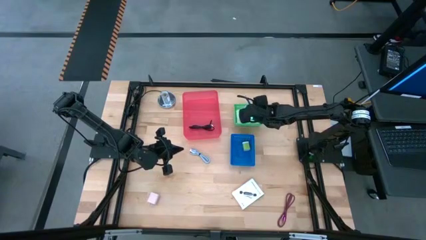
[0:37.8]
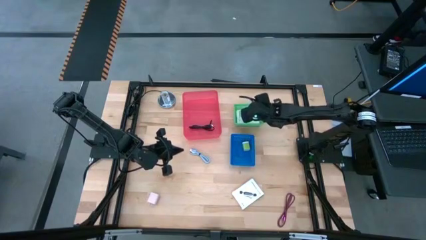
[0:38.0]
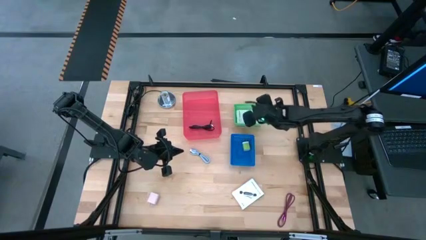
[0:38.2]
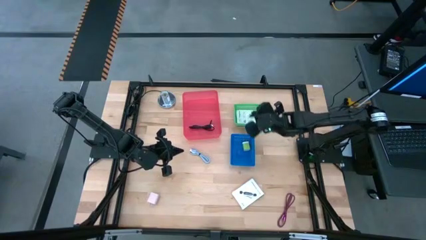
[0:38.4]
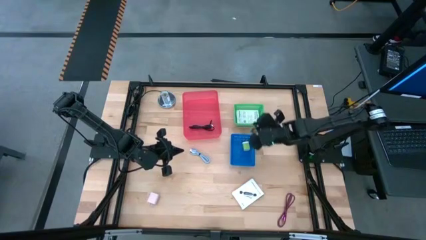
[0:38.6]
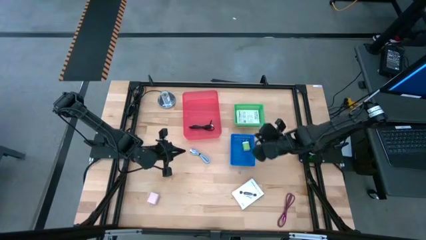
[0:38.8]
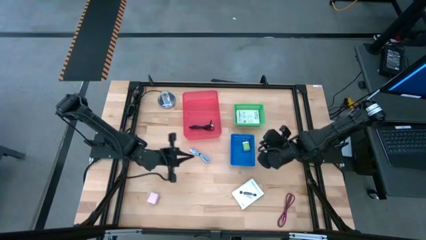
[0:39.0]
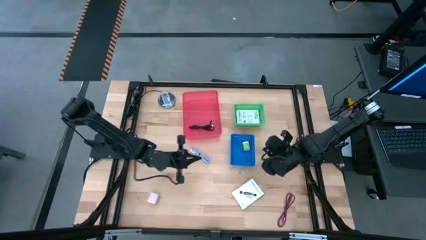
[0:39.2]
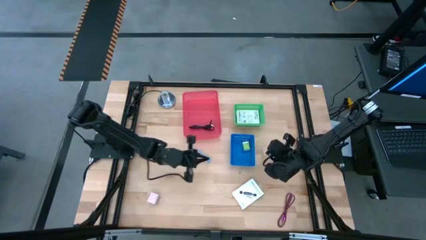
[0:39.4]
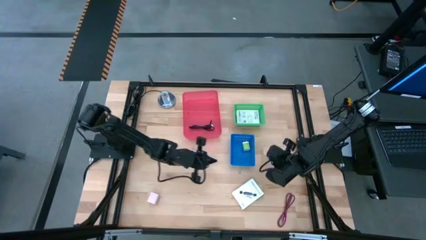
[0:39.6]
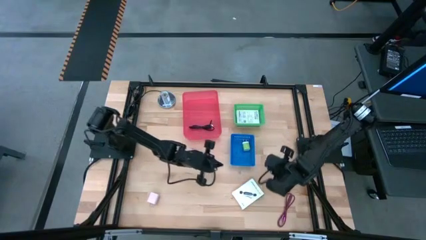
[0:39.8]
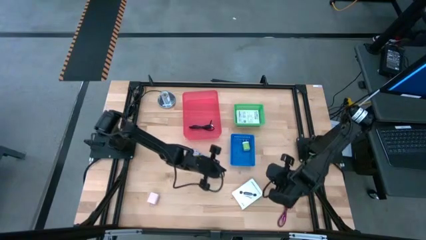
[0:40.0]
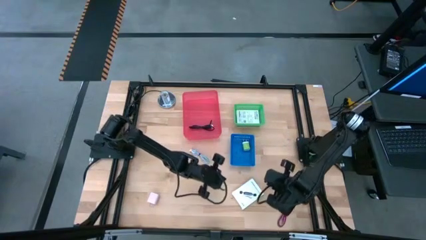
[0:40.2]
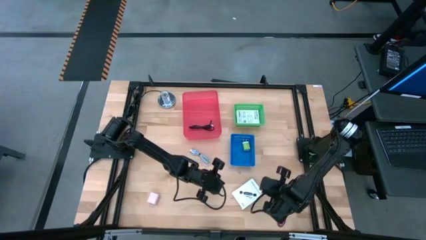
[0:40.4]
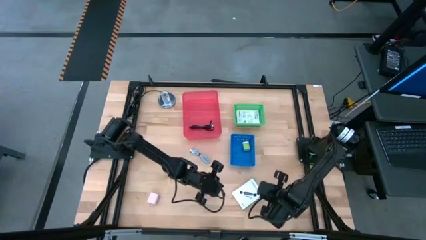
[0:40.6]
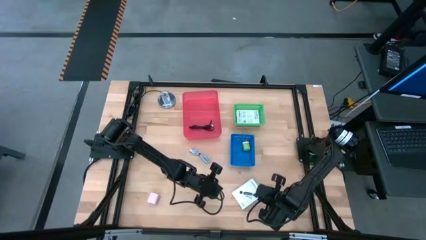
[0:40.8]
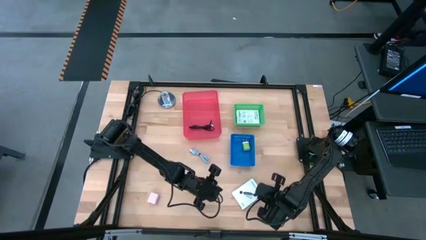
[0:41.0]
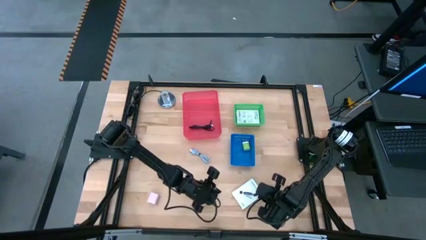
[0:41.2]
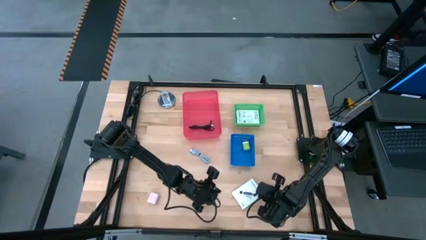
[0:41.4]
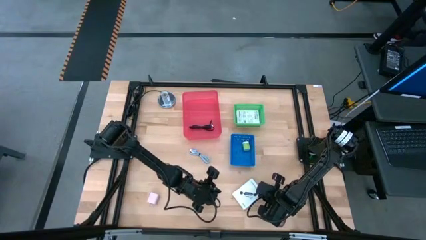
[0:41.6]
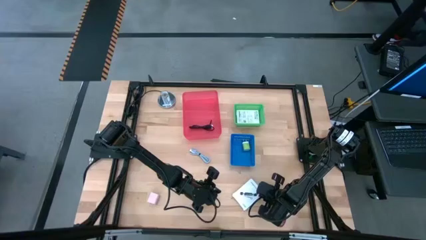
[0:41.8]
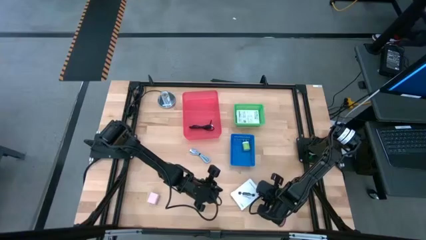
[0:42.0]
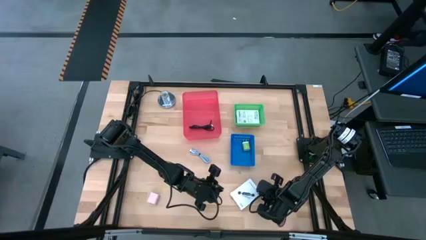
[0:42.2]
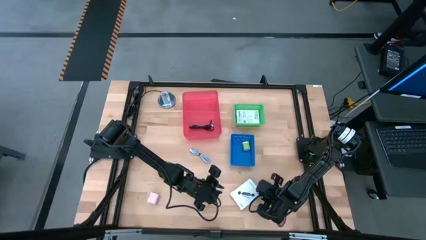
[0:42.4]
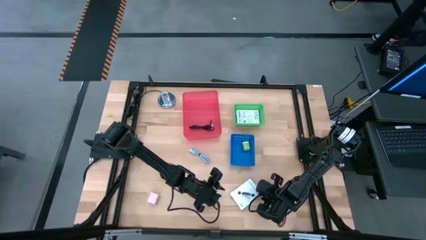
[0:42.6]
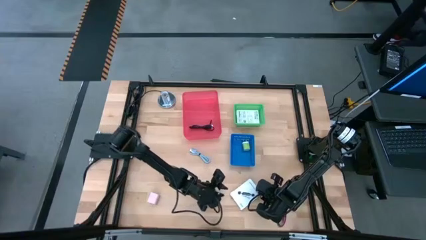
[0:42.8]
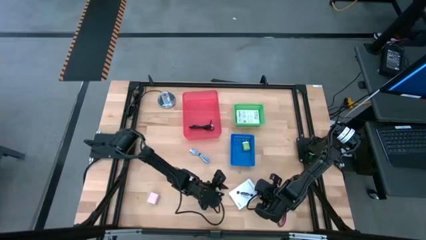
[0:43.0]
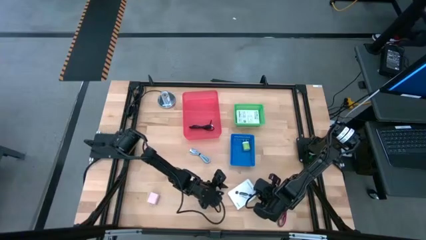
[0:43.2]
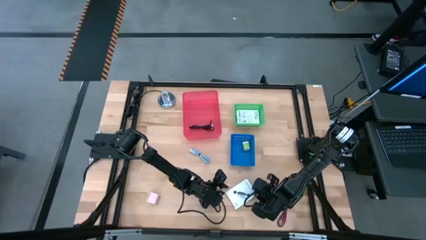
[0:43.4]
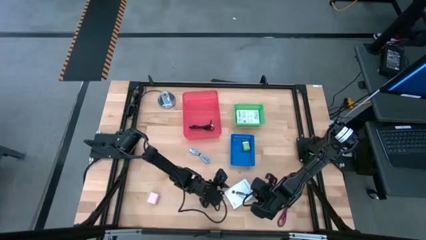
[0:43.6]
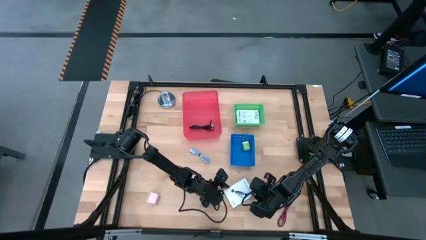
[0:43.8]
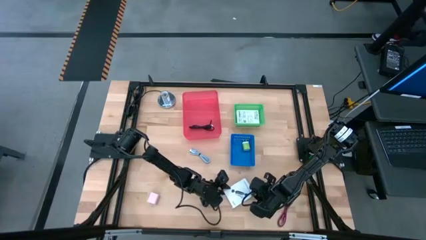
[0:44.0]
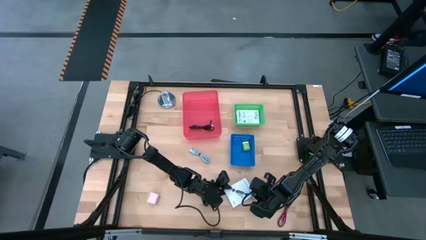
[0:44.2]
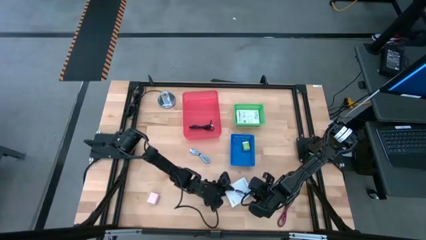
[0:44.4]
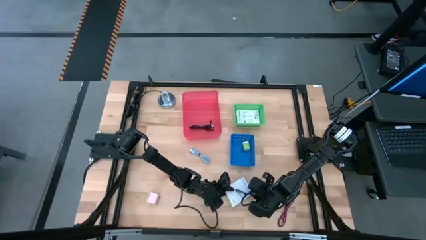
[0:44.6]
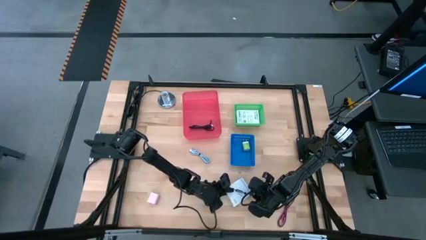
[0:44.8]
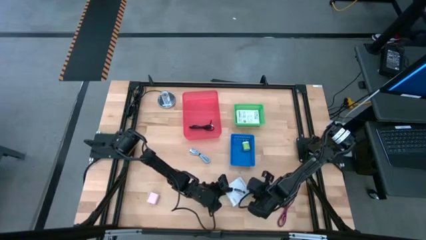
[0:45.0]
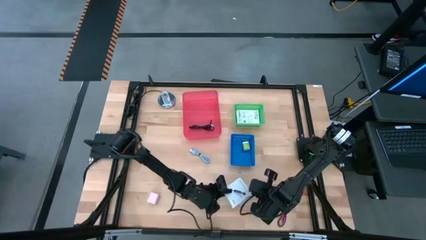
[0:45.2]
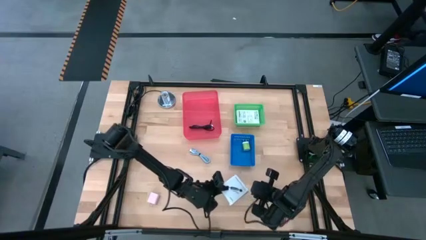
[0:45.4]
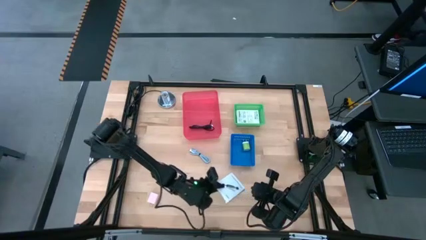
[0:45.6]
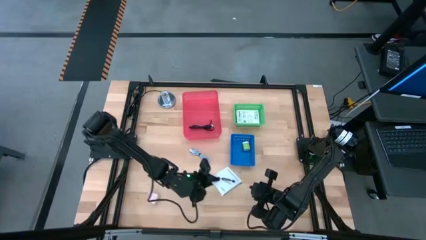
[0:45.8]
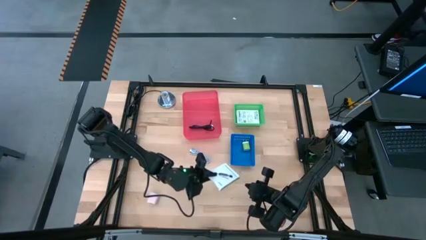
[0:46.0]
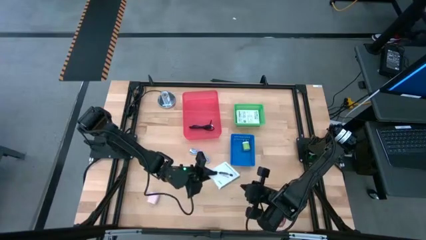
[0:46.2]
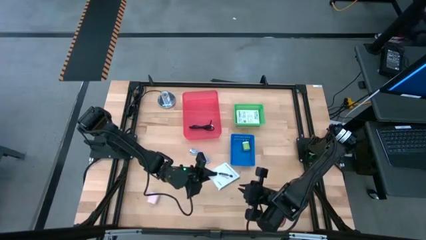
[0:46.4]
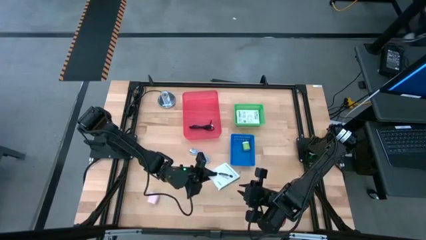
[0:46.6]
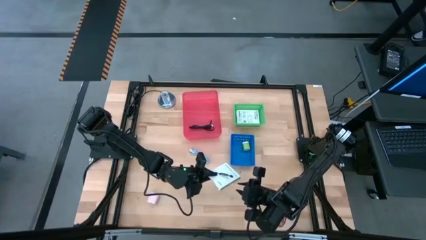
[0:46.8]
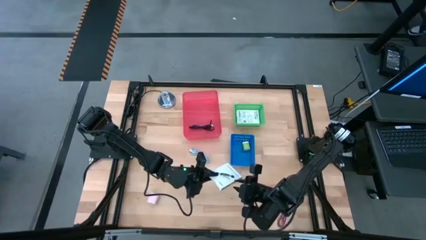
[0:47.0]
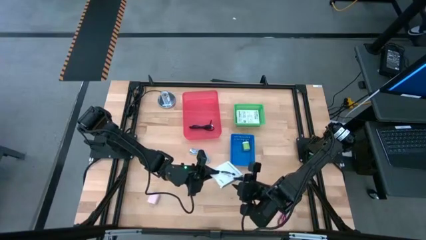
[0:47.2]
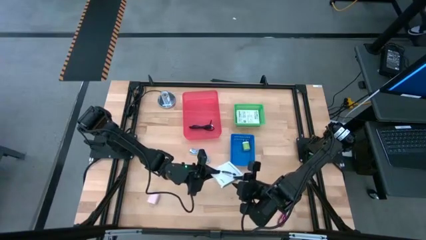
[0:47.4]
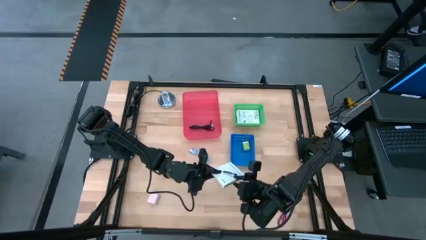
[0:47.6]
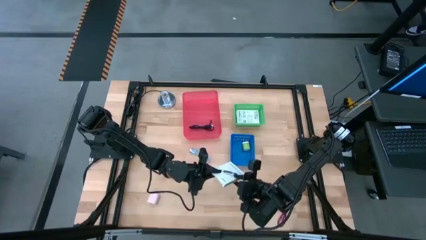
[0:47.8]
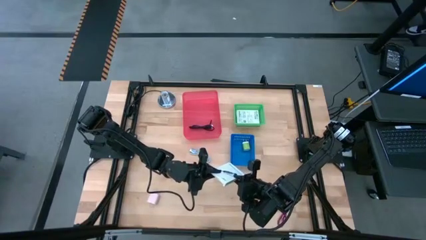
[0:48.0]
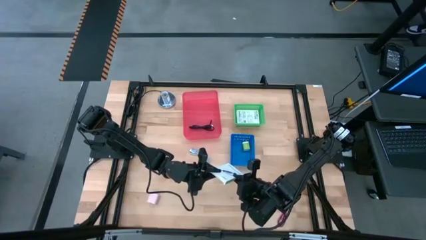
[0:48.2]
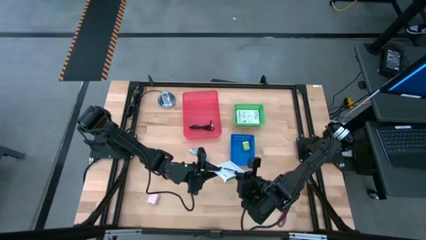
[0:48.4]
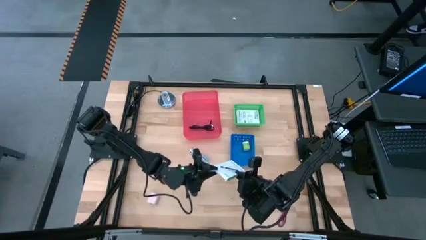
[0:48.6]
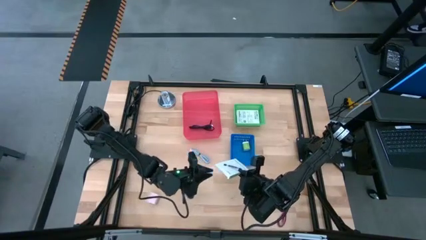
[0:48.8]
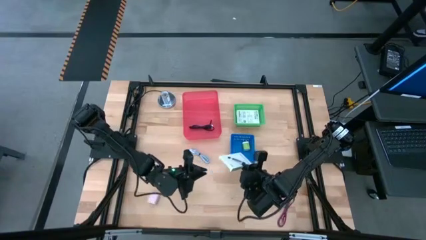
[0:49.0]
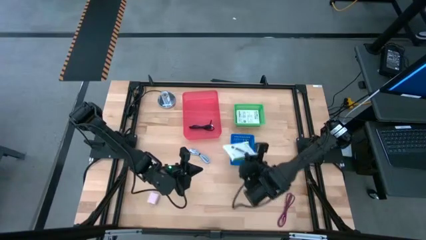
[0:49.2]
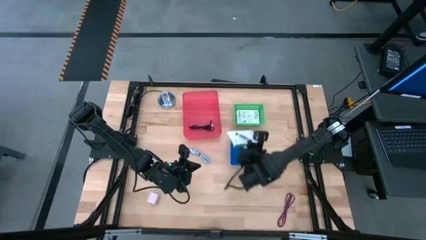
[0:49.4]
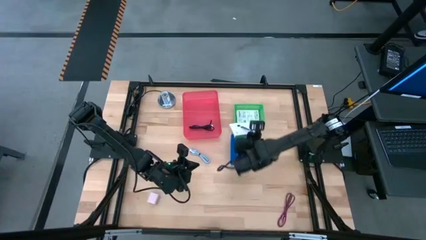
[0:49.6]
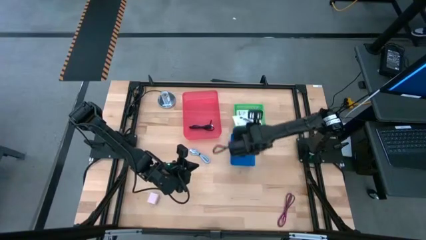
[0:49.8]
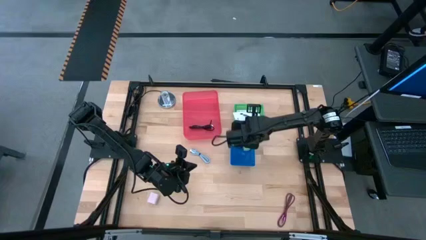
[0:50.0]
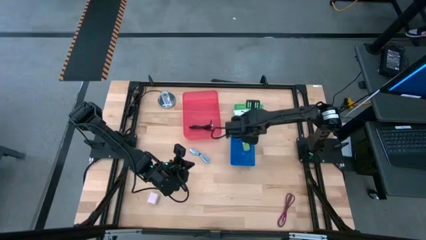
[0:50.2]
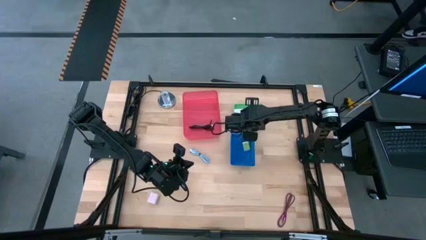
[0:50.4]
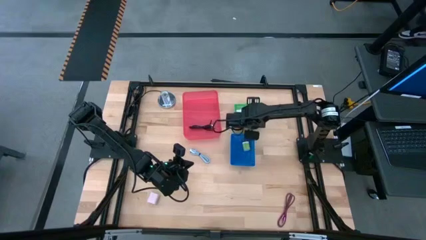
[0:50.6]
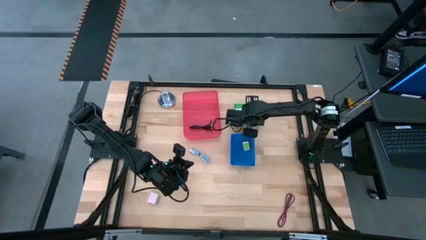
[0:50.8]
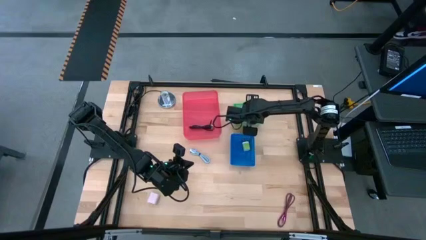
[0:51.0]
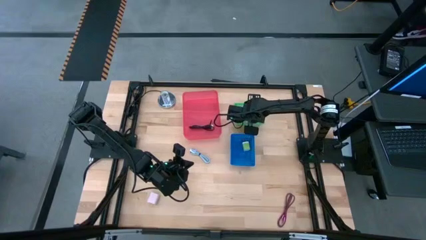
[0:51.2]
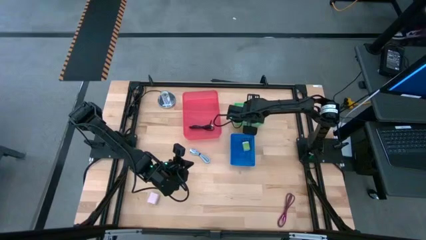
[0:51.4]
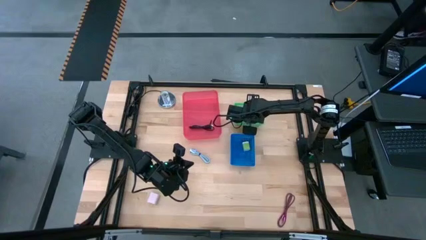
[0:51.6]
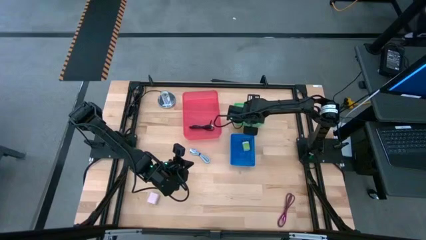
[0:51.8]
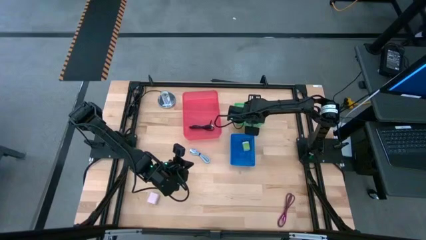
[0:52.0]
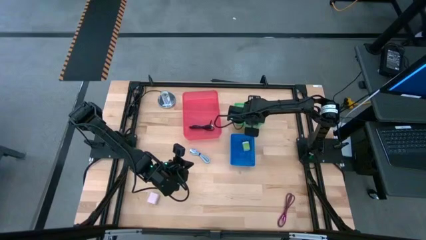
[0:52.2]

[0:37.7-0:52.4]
Task: Pick and place items into bin
Put the card reader box into the green bin

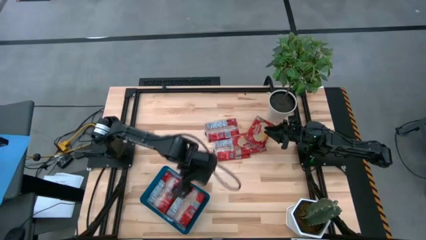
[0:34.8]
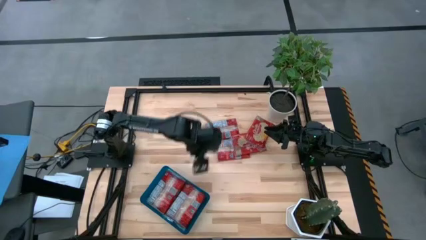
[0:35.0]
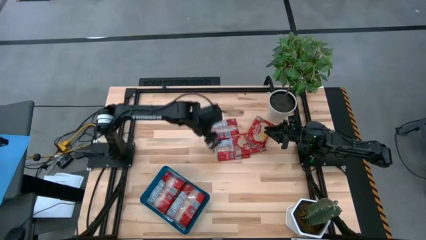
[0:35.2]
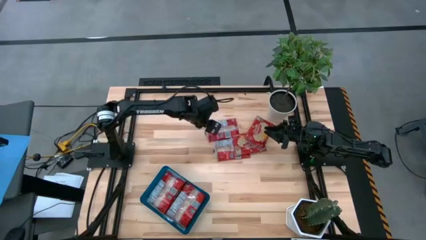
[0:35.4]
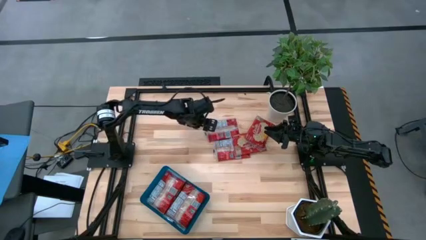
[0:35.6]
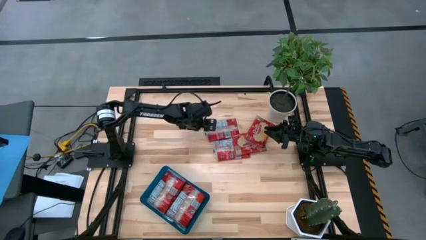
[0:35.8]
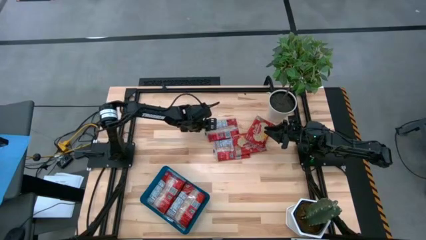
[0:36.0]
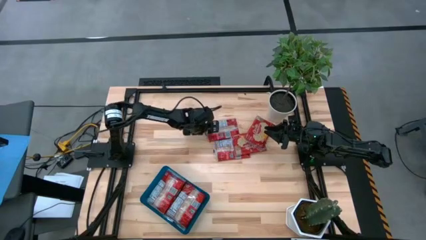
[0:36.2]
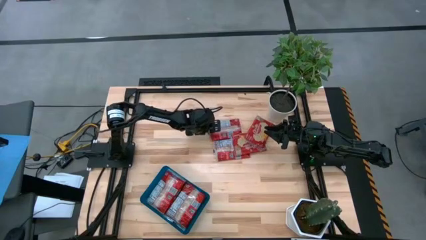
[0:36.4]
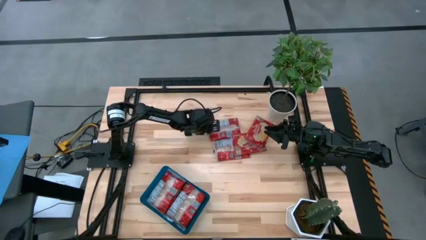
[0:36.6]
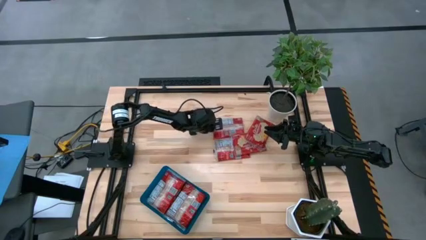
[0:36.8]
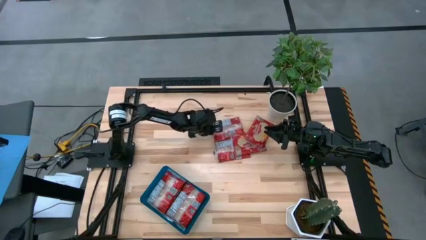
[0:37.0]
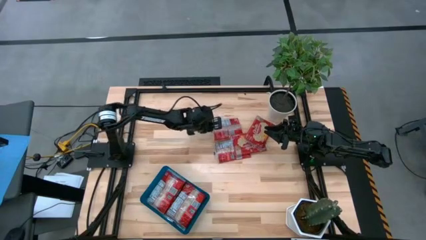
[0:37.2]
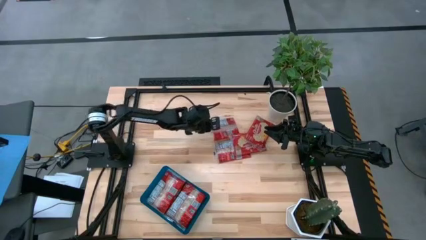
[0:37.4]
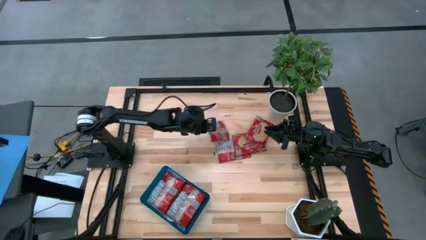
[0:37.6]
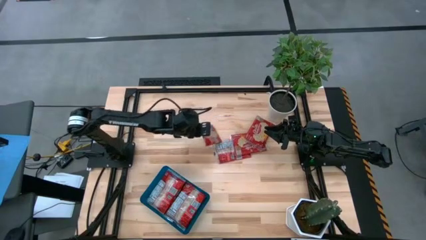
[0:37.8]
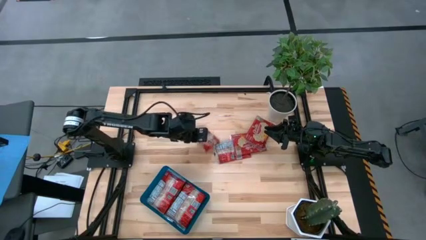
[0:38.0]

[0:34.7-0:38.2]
Task: Sort popcorn bags into baskets
Put the red popcorn bag into the blue bin
